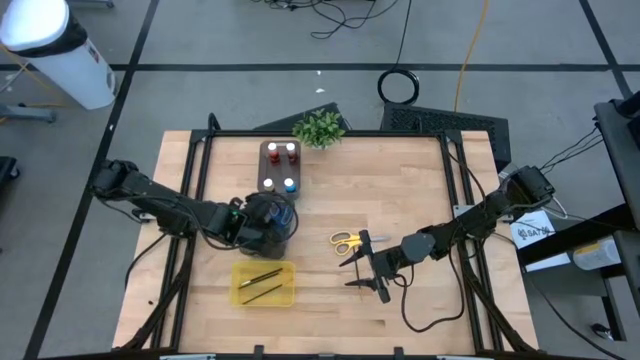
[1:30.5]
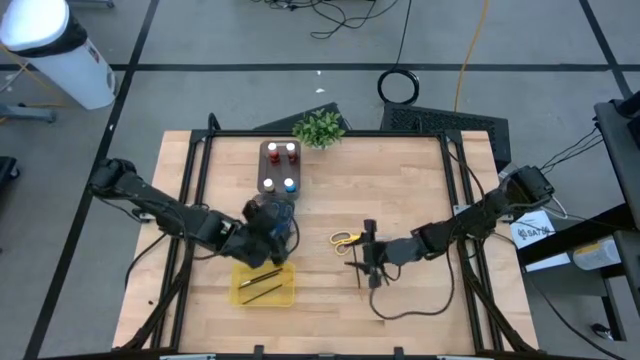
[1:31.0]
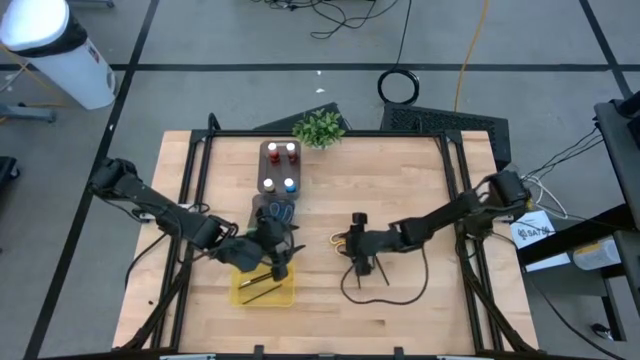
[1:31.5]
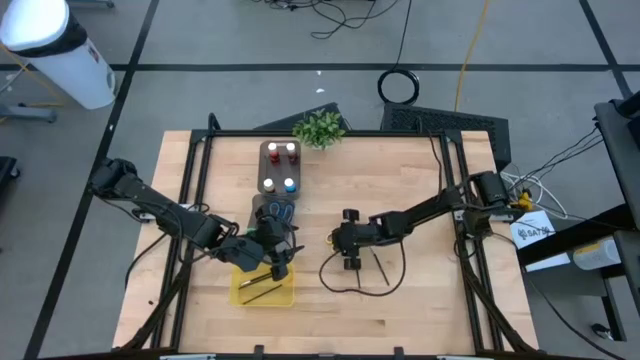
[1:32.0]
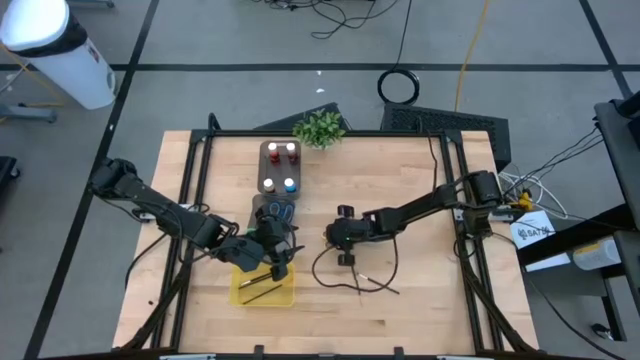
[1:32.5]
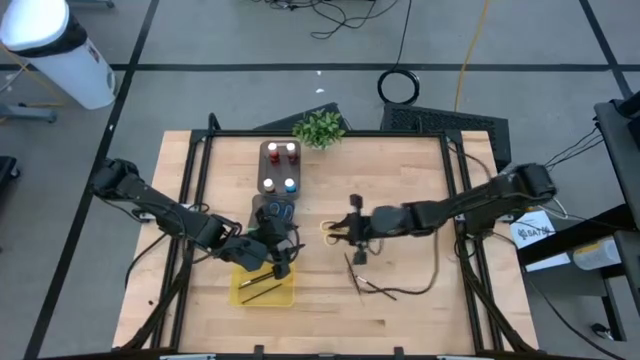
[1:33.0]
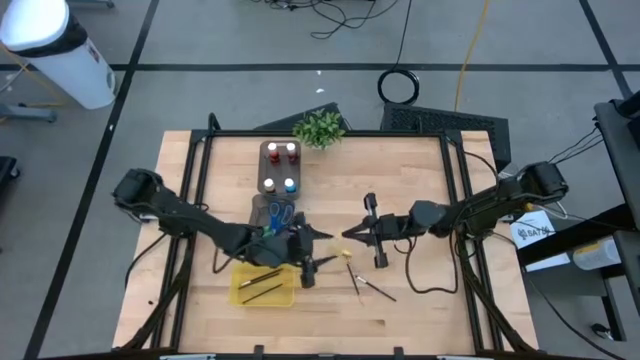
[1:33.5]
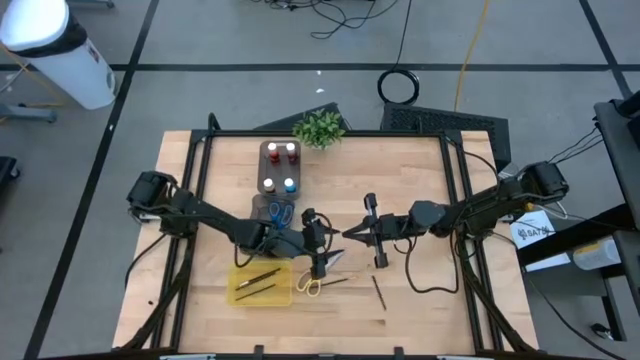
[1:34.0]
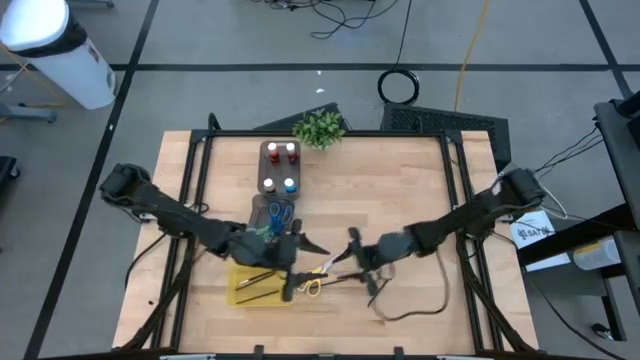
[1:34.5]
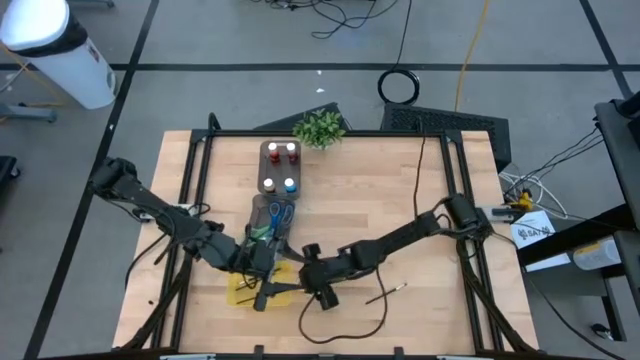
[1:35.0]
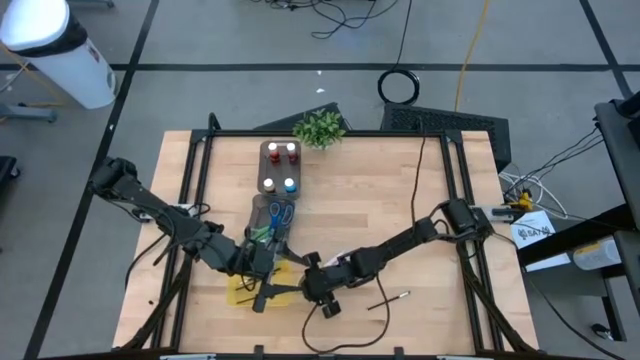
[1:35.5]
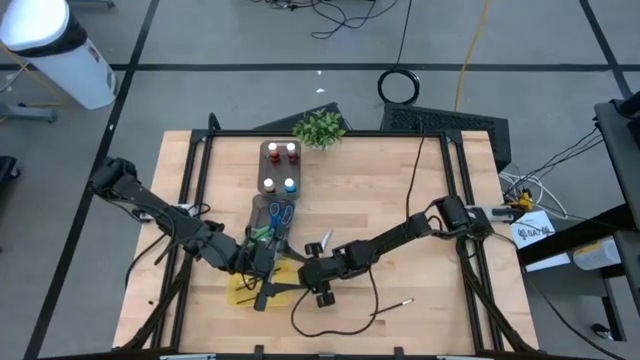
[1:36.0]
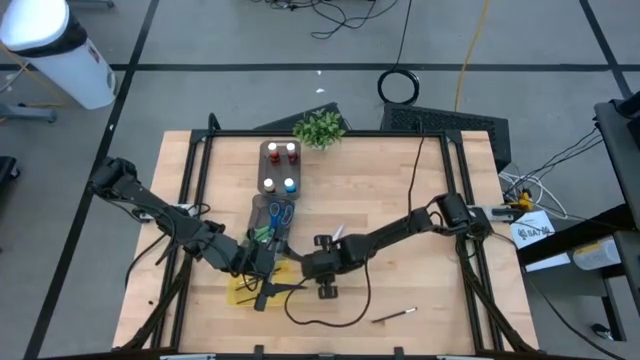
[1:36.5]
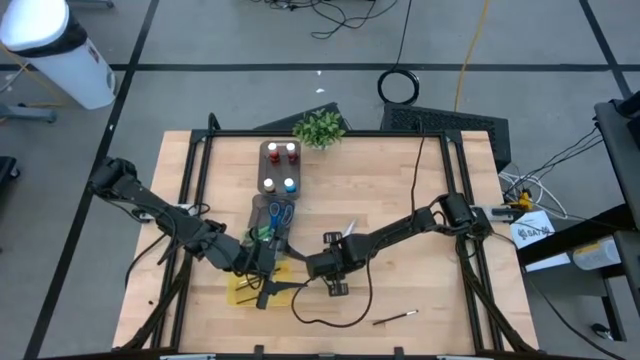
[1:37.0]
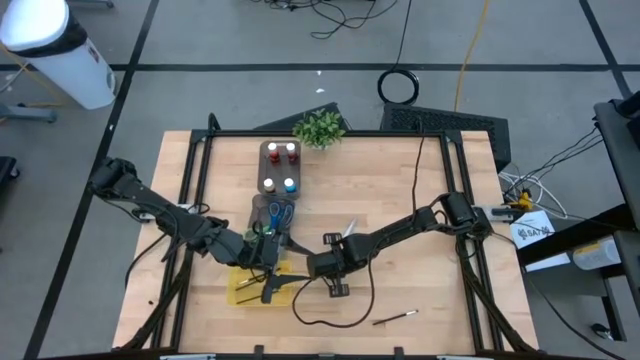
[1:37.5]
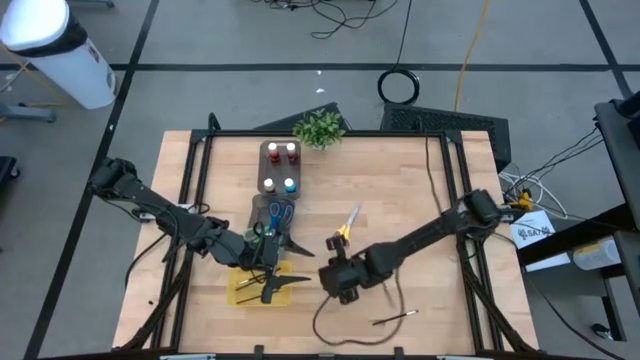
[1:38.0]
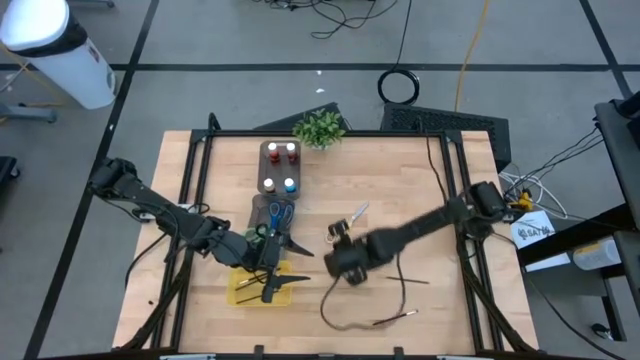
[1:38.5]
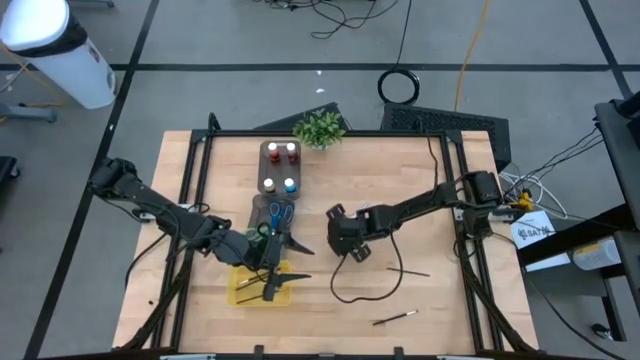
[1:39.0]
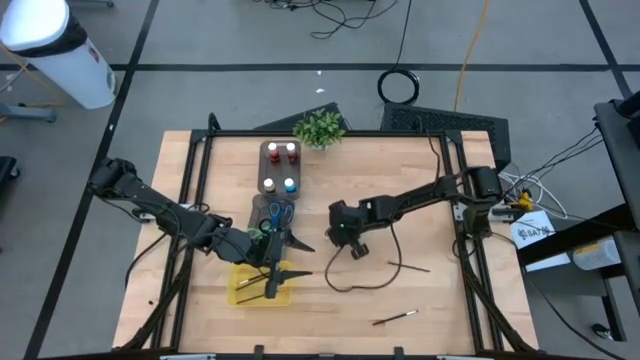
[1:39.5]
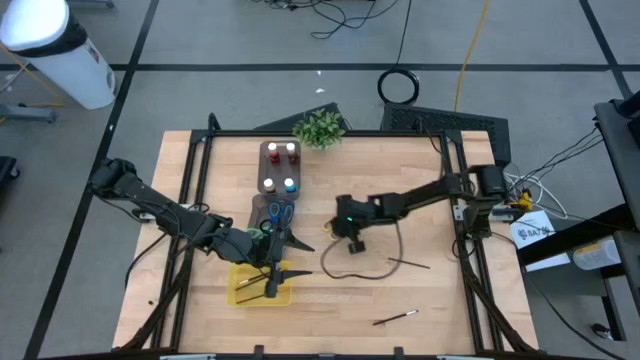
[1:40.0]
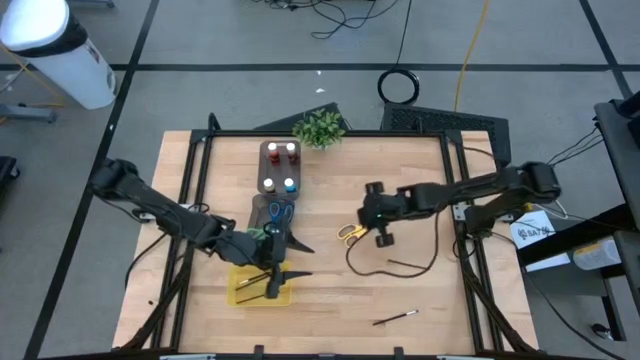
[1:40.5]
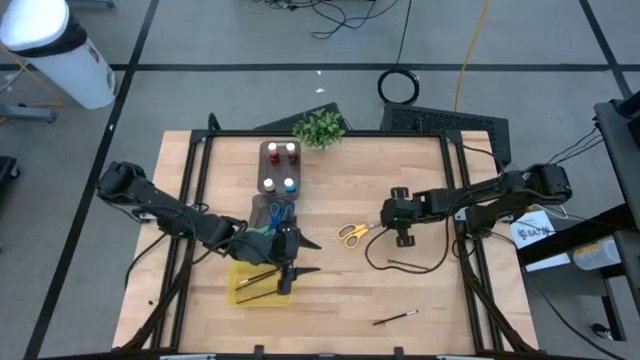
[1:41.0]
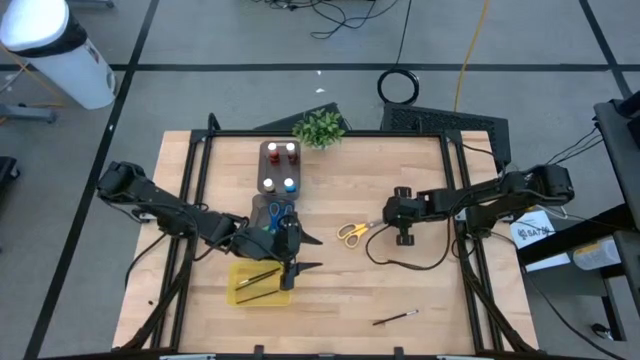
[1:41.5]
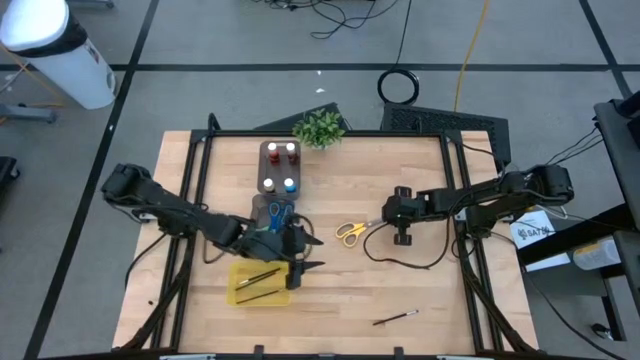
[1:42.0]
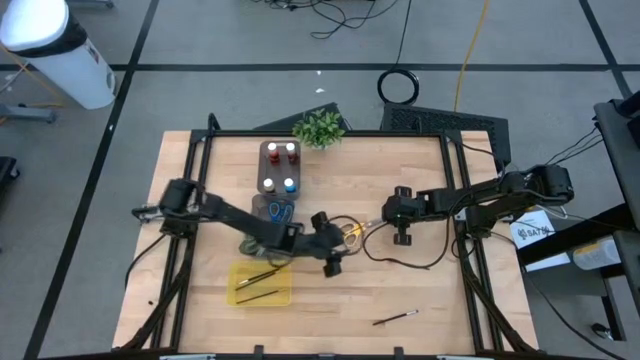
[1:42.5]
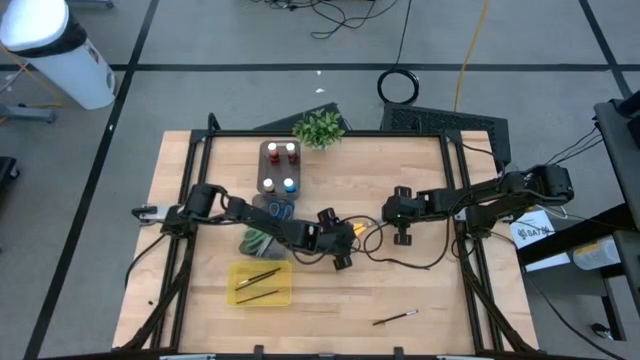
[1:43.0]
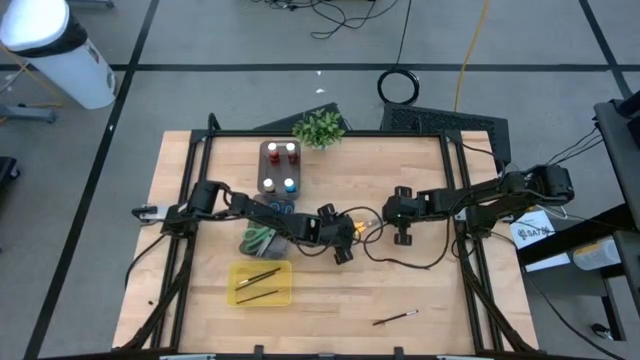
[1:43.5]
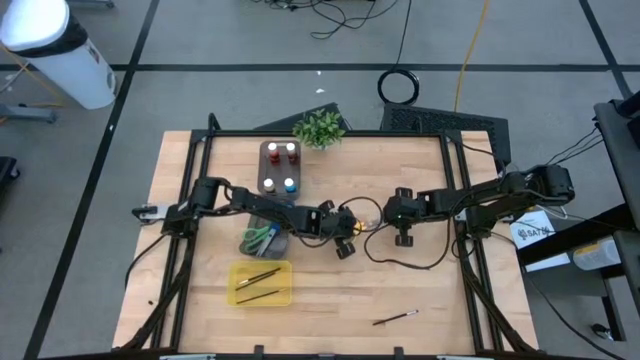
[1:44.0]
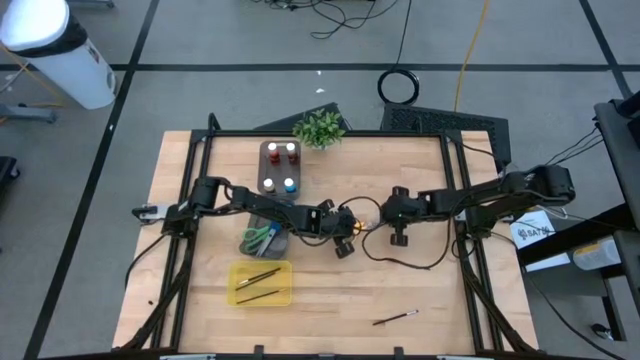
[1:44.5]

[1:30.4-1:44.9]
Task: Pick & Place Paint Supplies
Put the yellow scissors into the bottom black bin

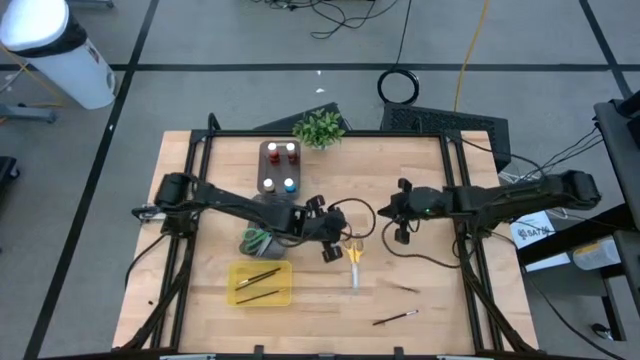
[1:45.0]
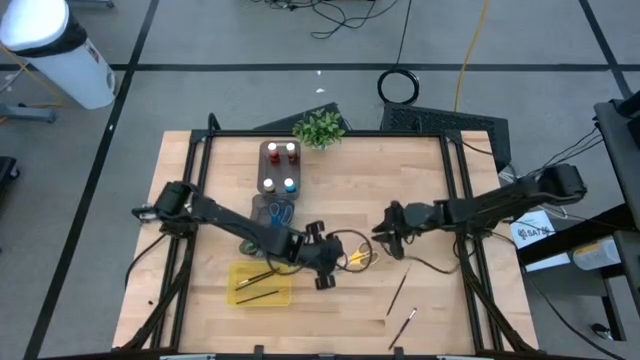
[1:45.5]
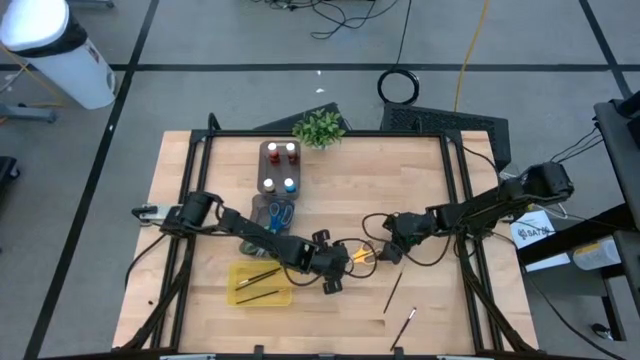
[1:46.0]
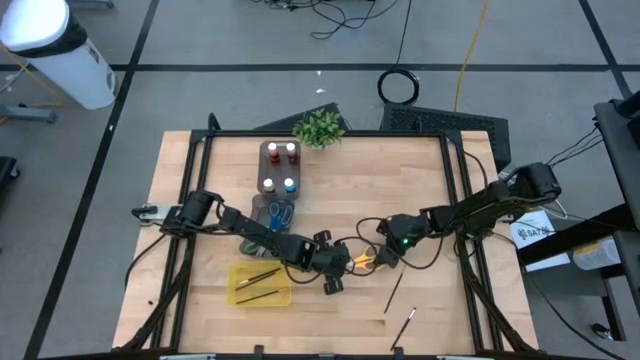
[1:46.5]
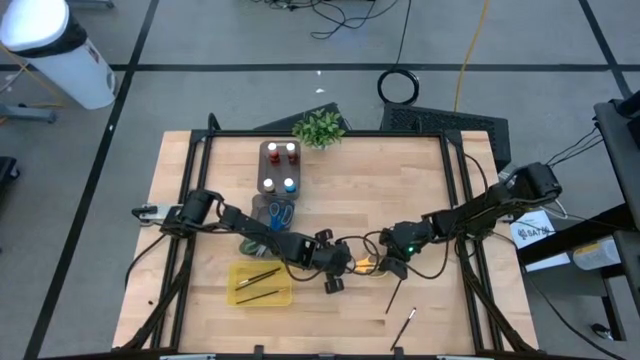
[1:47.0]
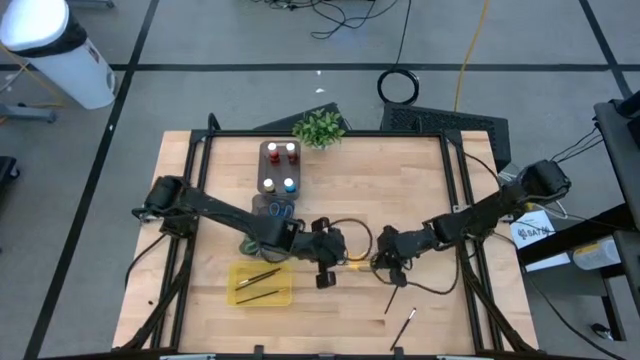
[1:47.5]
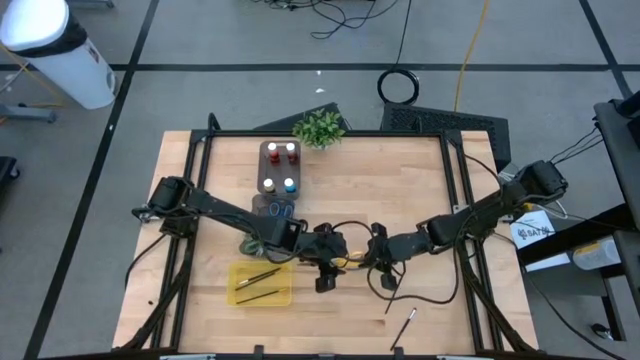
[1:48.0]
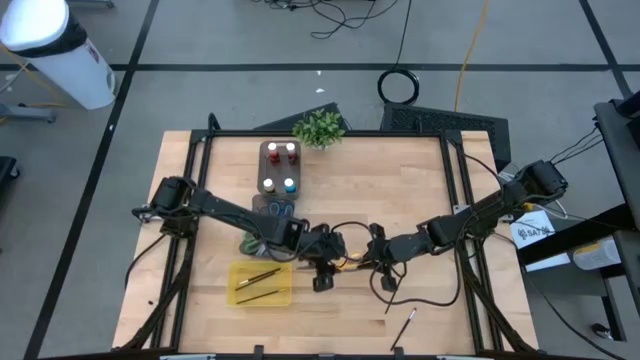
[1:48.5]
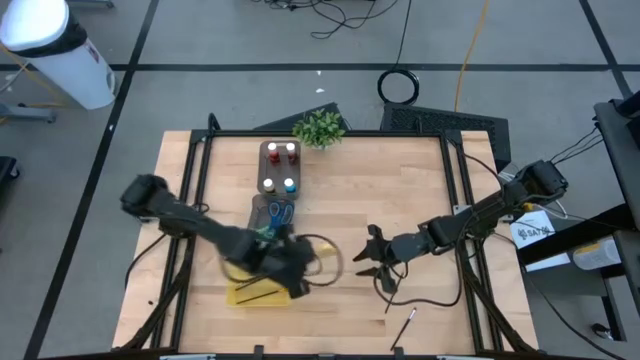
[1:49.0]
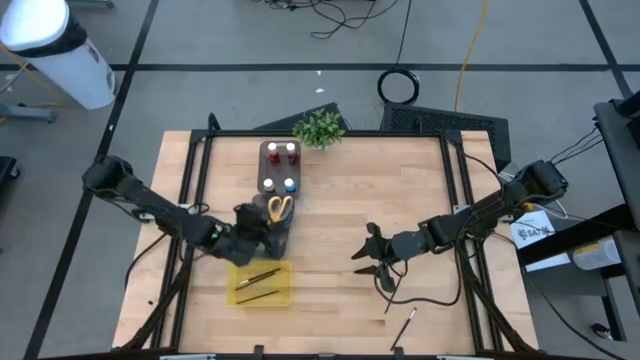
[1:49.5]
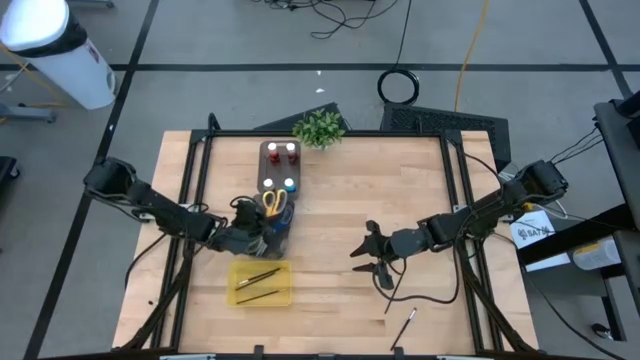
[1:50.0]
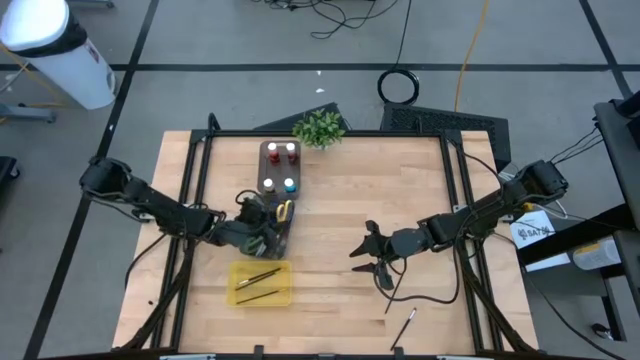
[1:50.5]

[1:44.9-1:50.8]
Put the yellow scissors into the bottom black bin

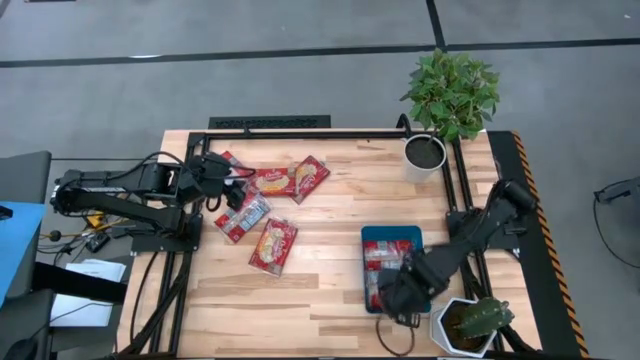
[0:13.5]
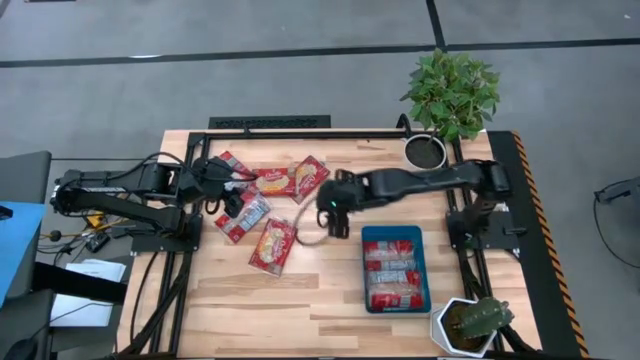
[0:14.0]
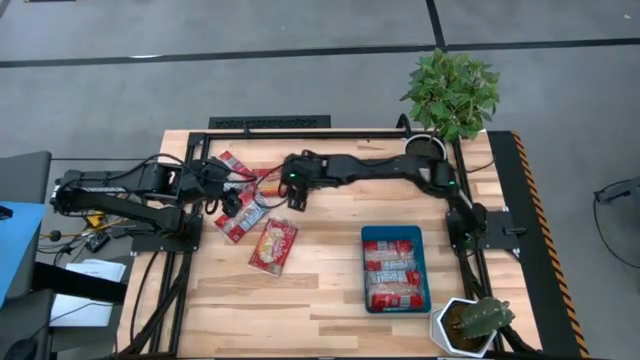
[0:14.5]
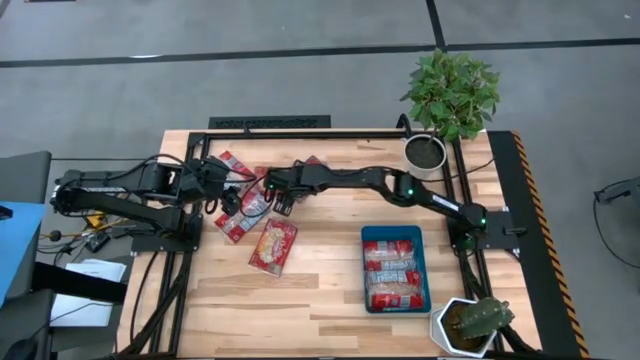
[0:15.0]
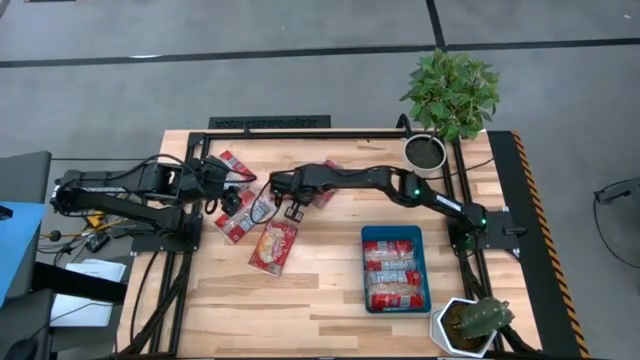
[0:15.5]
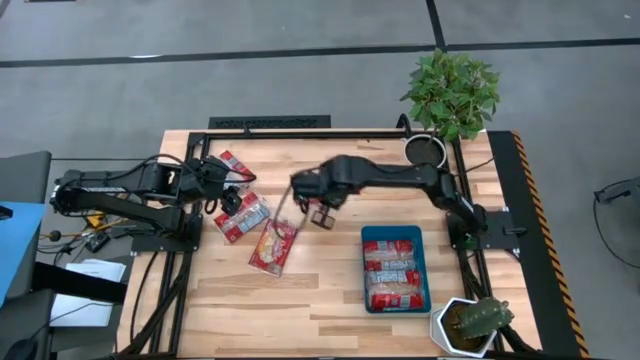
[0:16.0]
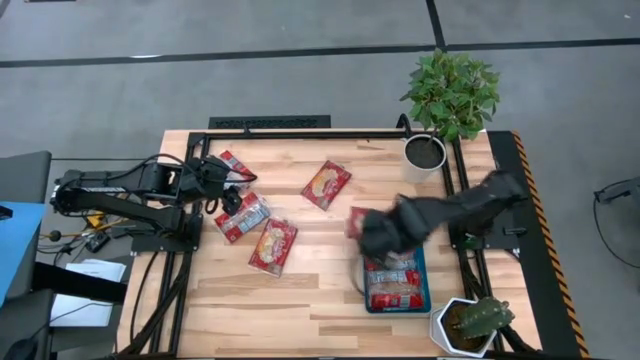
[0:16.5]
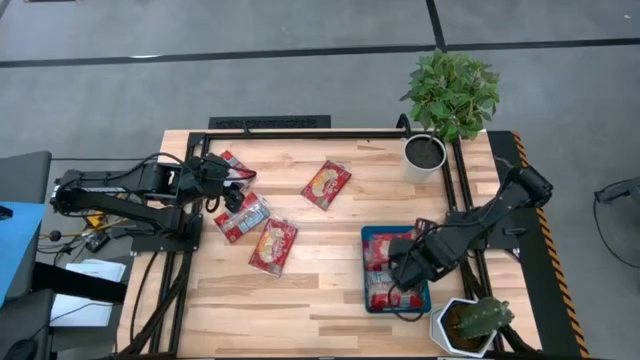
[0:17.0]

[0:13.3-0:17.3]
Task: Sort popcorn bags into baskets
Put the red popcorn bag into the blue bin
